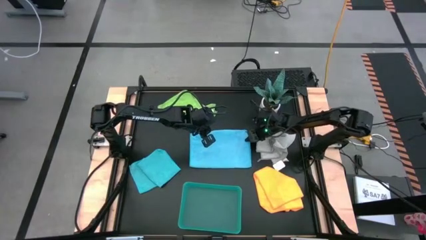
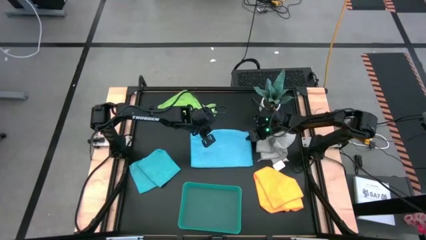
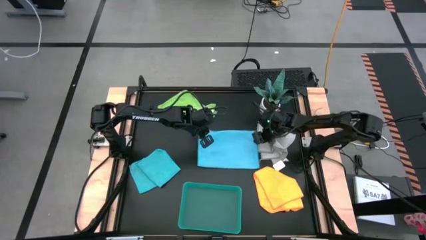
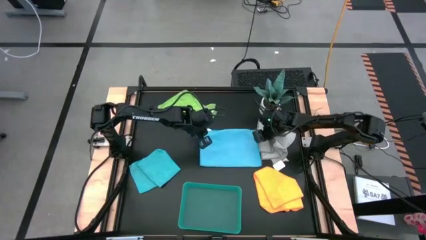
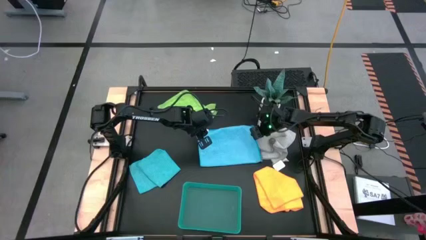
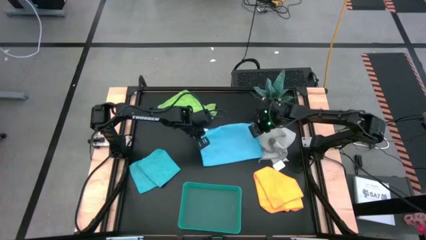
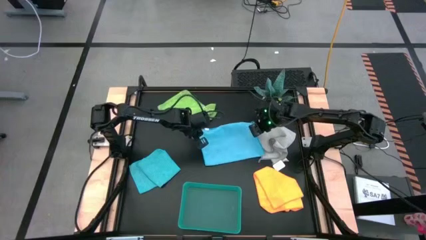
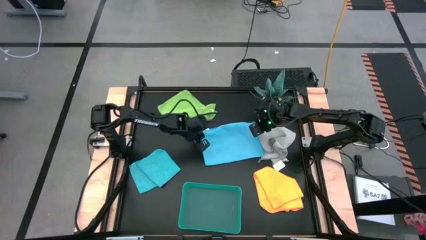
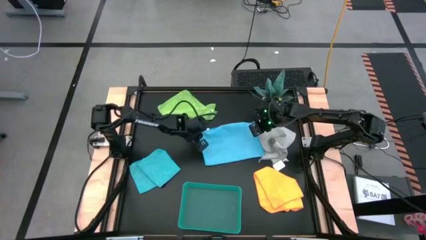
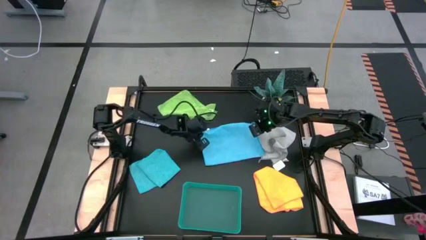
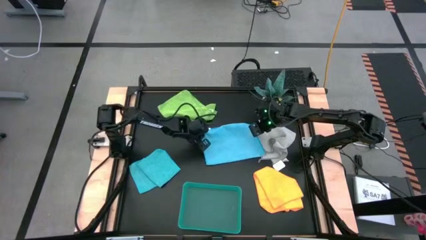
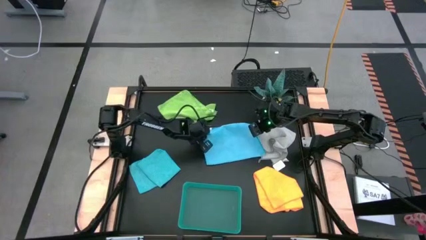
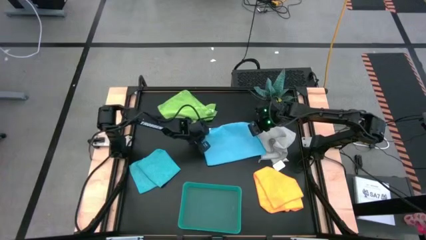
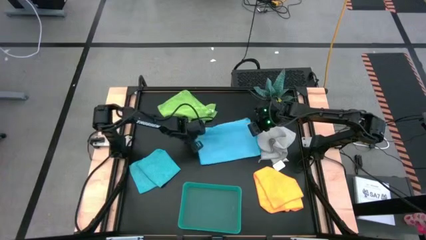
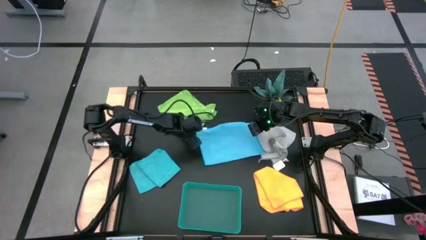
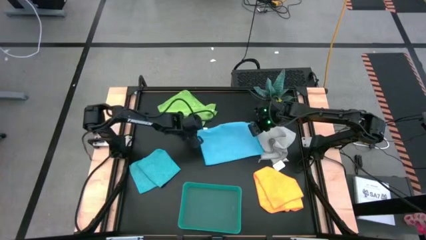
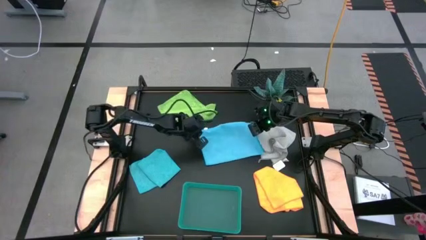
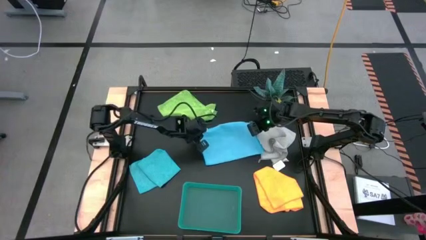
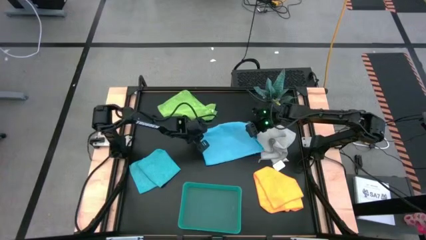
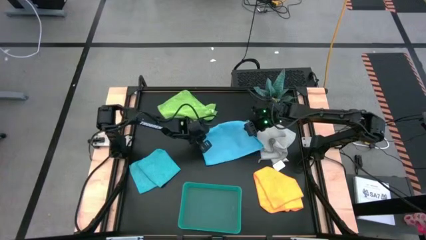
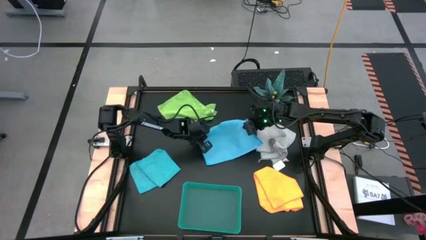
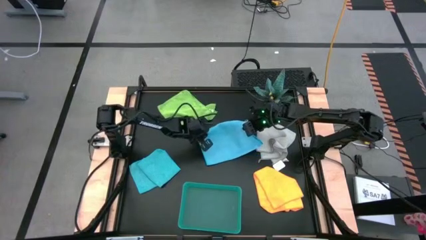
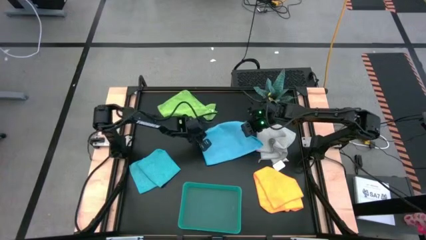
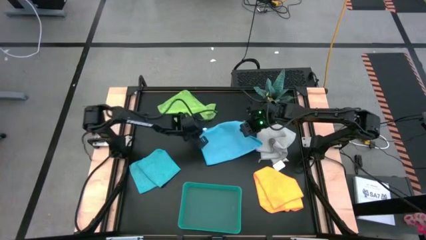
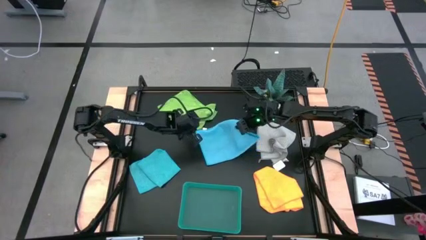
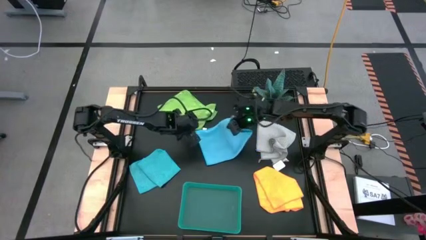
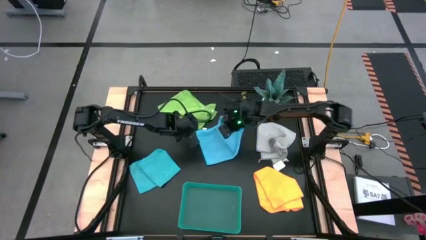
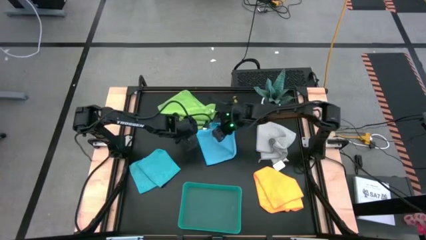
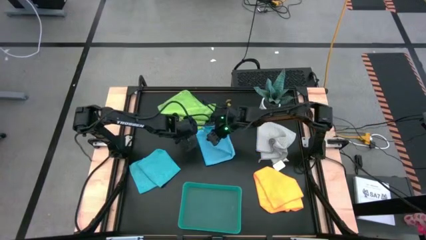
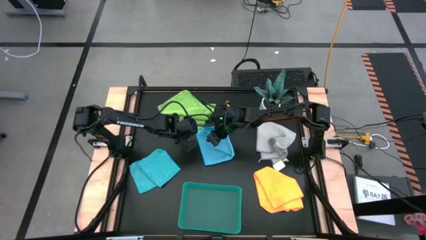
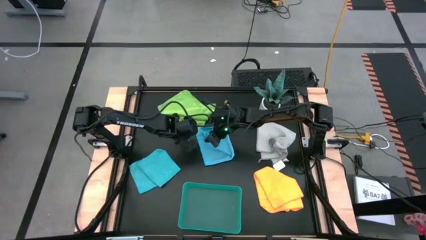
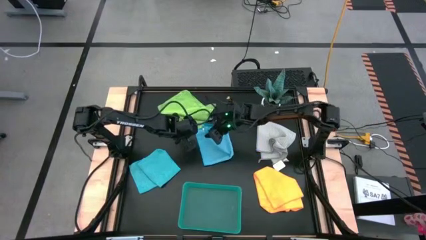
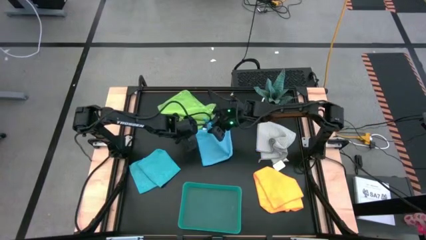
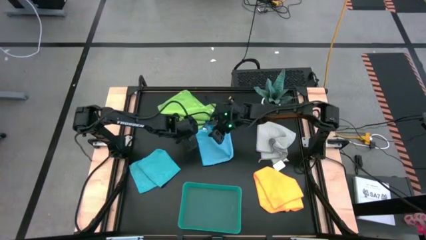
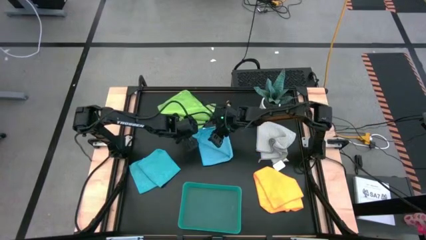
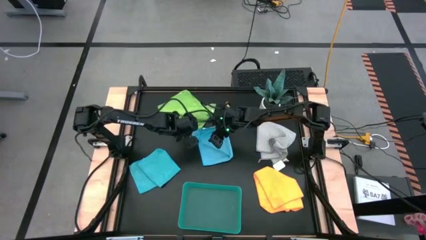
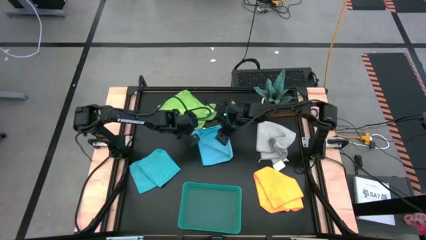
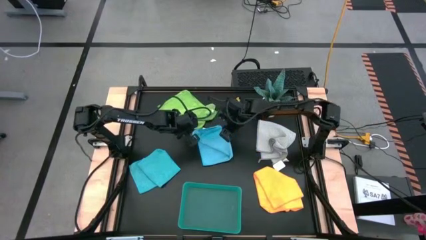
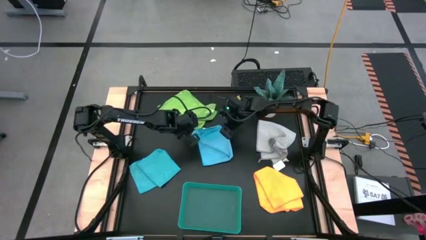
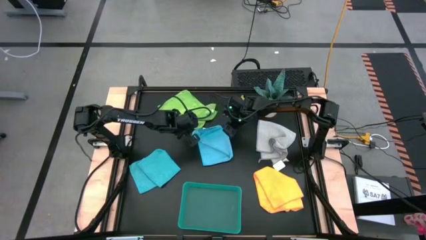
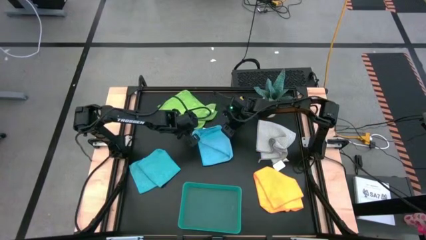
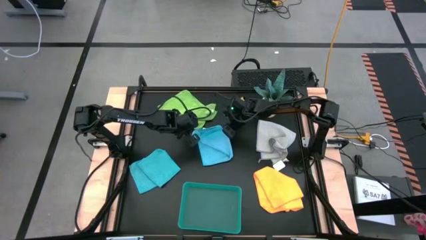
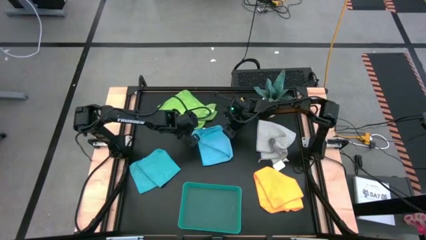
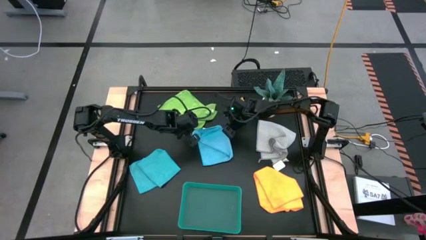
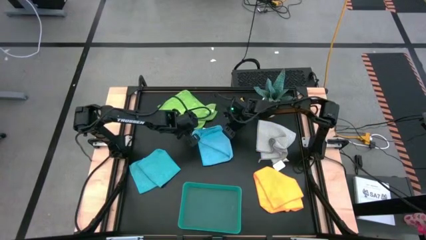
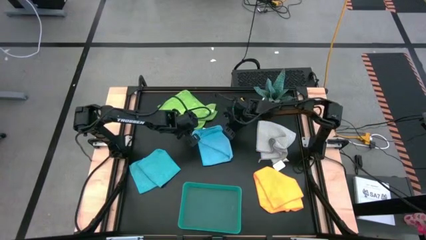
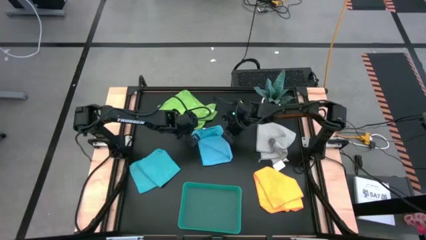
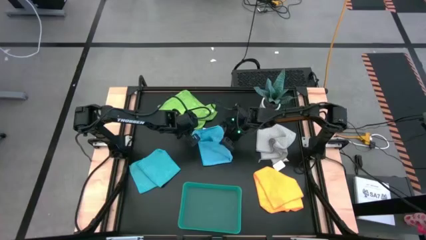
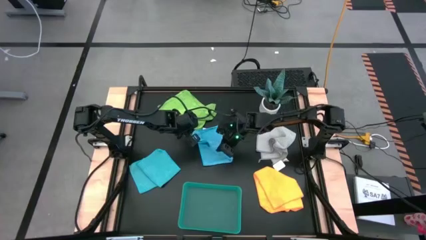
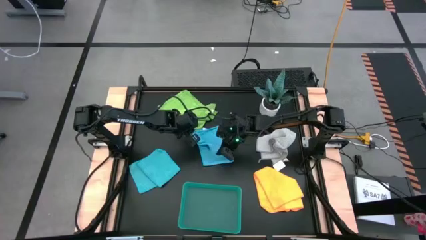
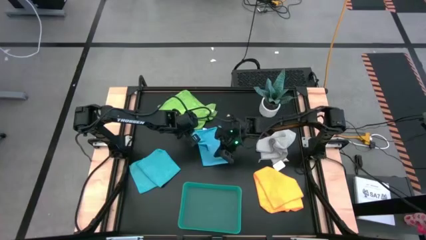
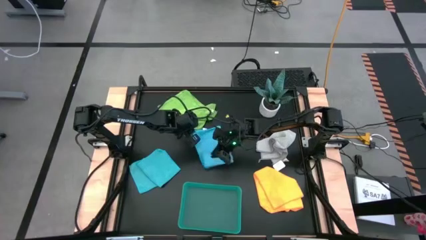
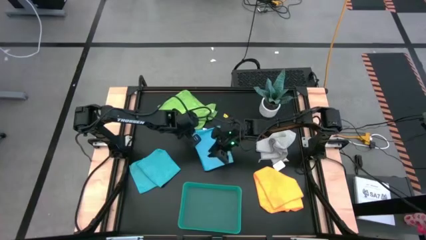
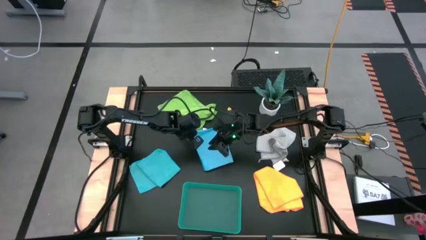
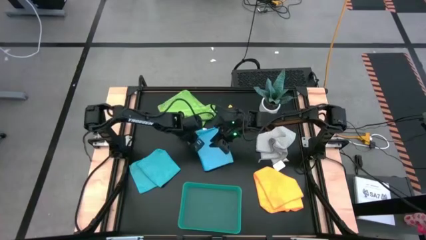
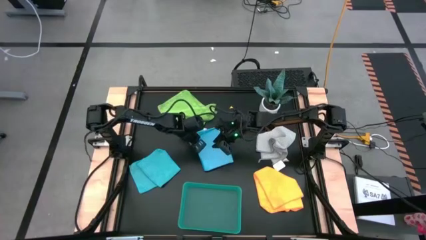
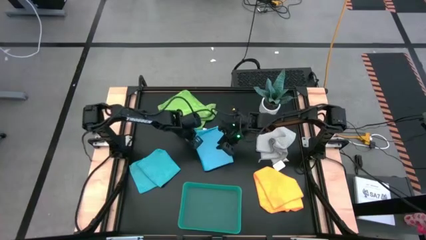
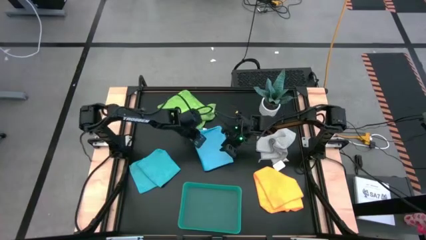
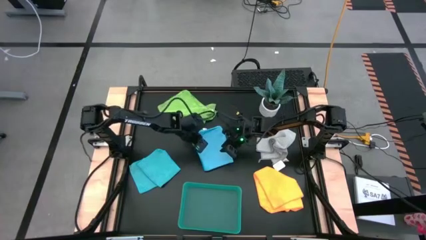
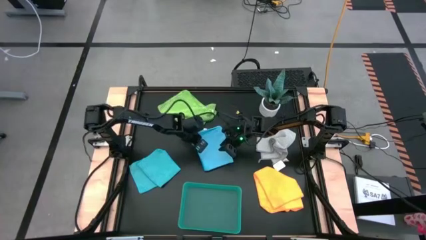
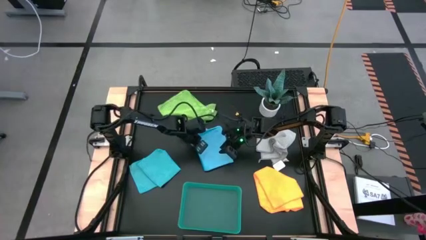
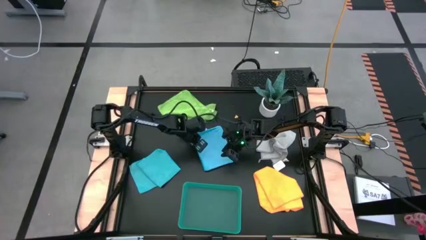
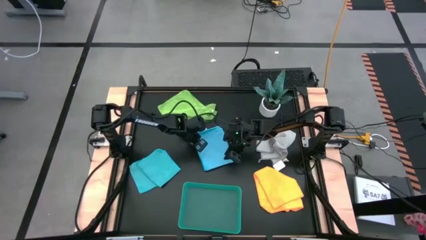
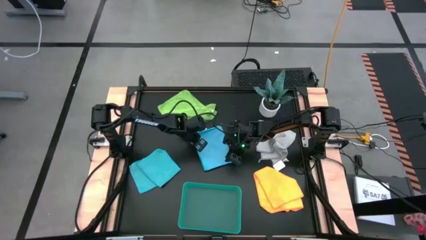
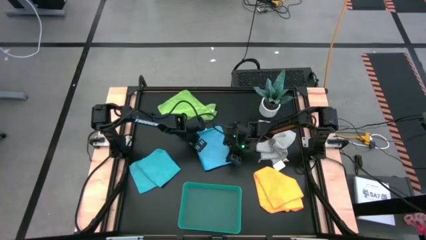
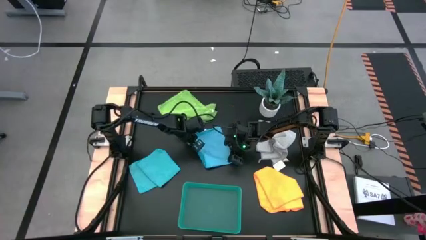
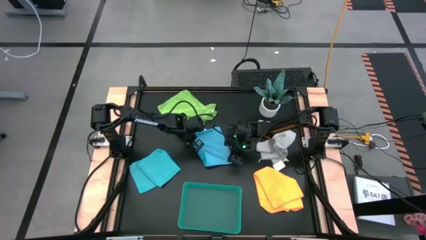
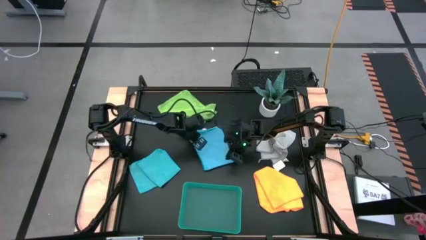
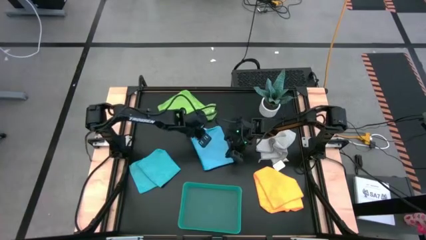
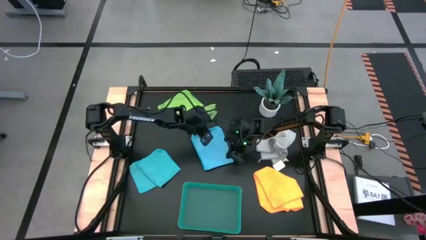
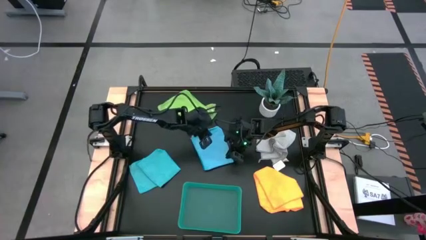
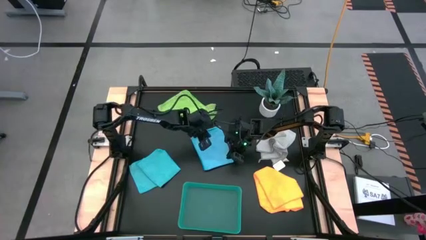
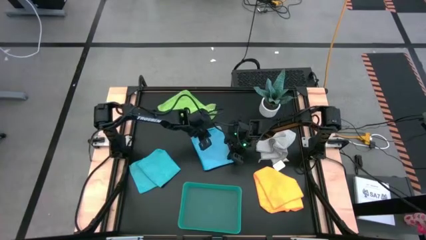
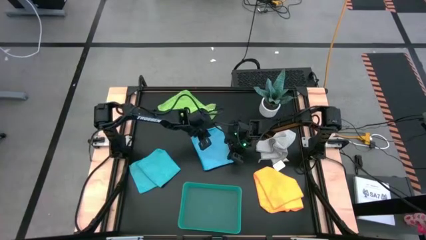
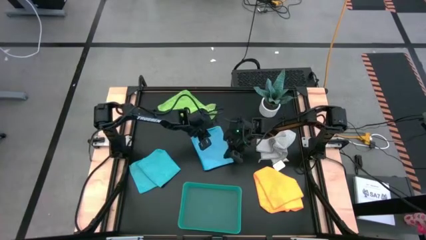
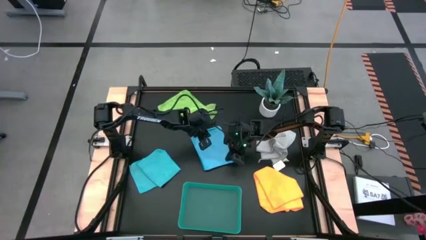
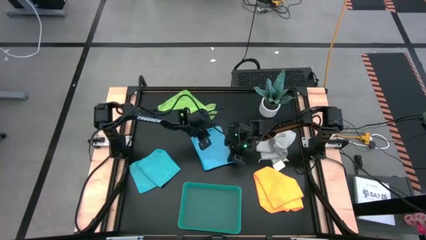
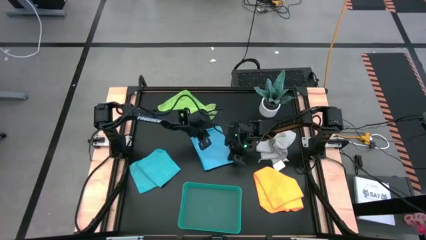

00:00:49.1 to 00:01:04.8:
Task: Fold microfiber towels
Fold the right blue microfiber cloth
